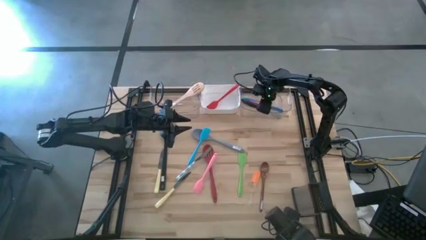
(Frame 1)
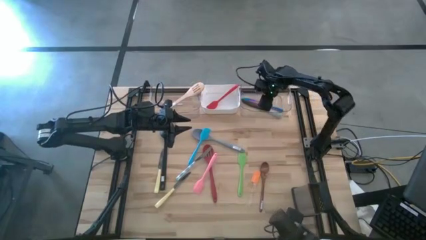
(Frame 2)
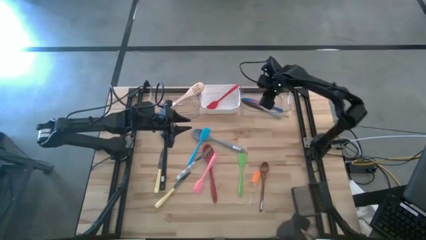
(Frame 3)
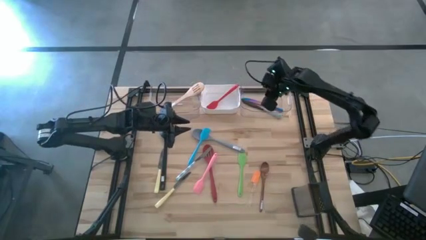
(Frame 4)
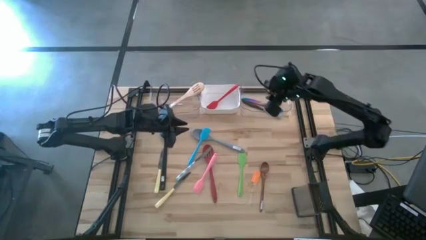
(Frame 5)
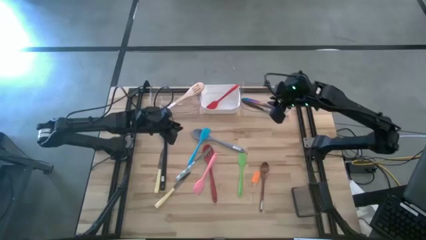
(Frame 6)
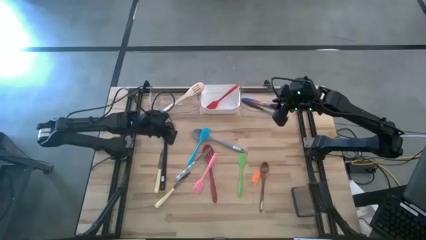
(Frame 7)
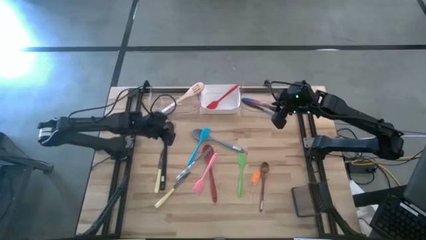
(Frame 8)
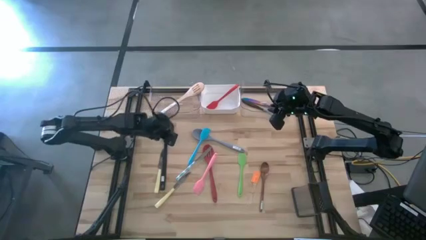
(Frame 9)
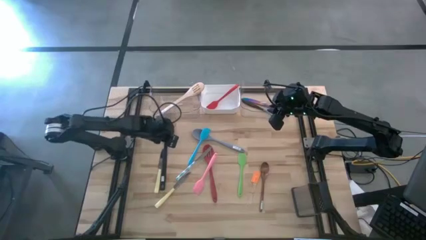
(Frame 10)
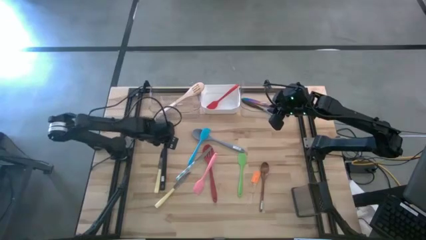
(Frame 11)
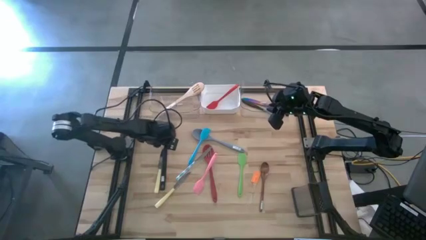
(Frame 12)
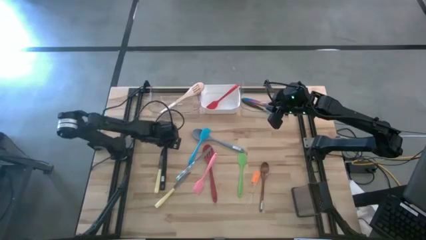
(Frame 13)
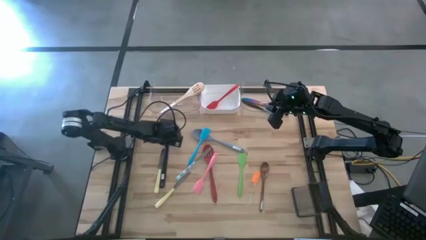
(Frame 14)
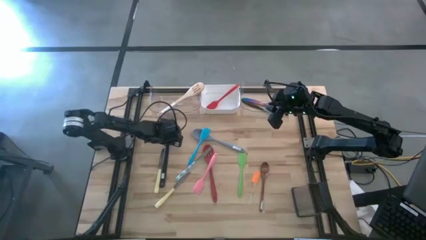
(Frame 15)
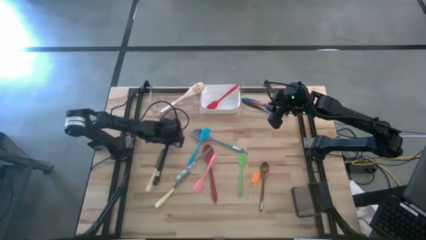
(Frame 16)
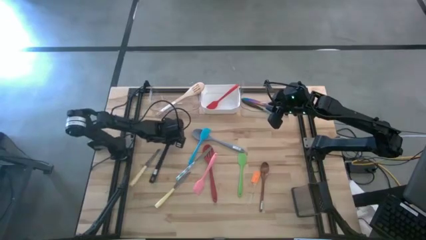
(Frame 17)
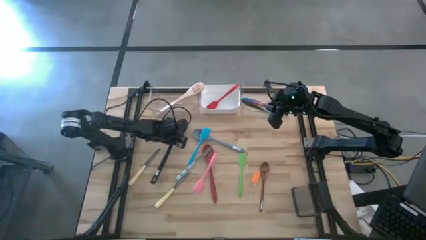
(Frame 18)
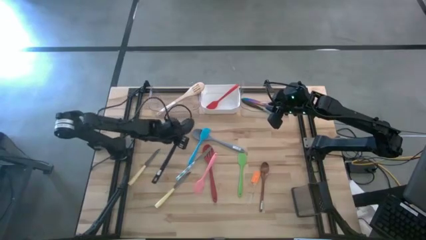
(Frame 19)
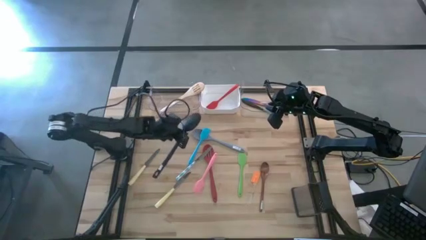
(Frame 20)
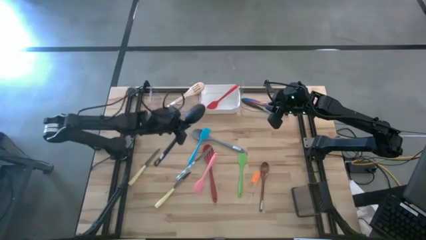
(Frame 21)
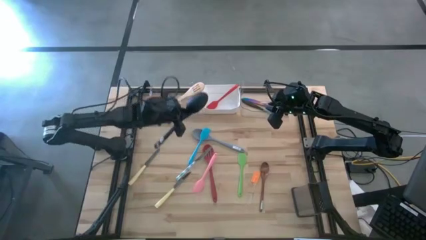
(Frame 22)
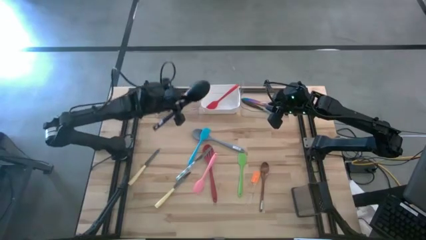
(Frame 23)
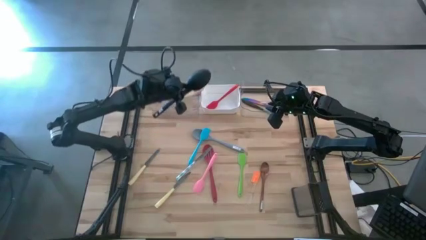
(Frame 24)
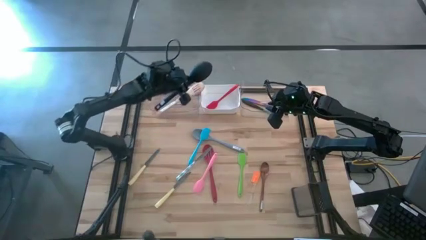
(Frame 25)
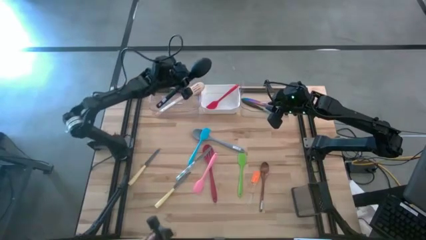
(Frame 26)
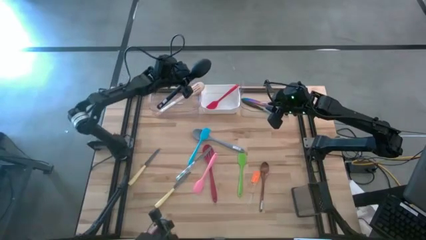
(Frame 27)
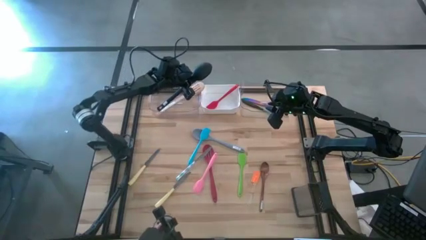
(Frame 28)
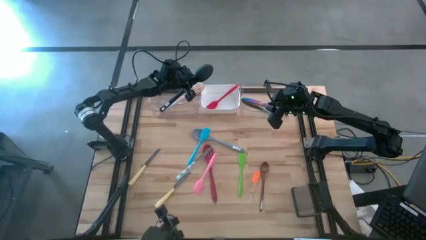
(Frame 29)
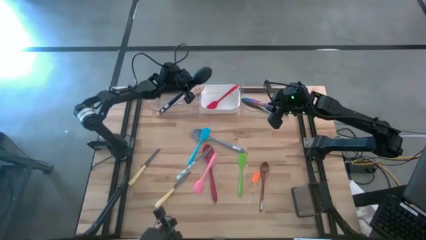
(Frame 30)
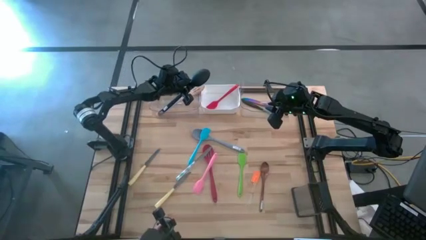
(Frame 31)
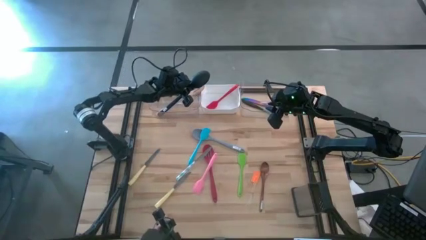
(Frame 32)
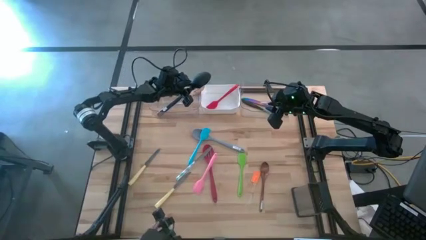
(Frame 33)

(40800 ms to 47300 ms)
Task: Pick & Place Kitchen Items
Put the black cooking spoon into the left transparent bin

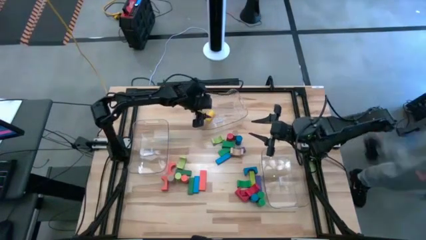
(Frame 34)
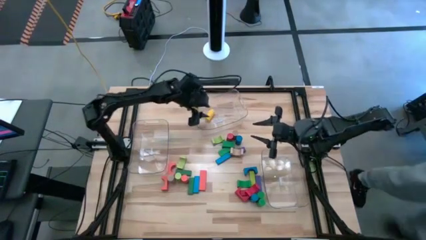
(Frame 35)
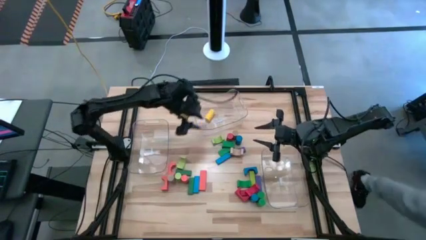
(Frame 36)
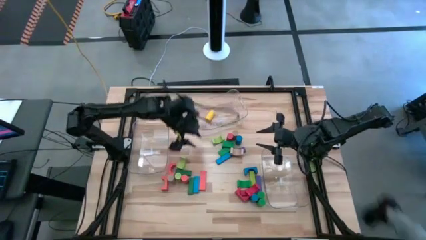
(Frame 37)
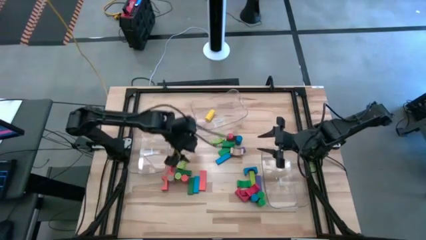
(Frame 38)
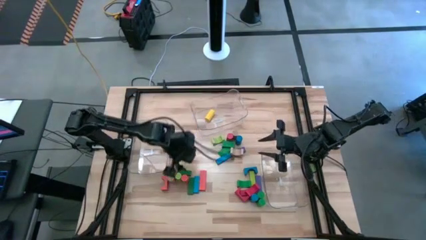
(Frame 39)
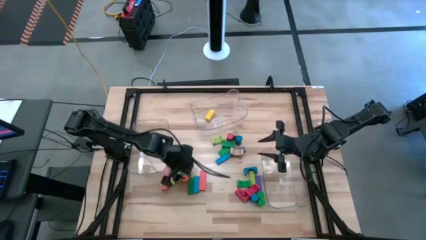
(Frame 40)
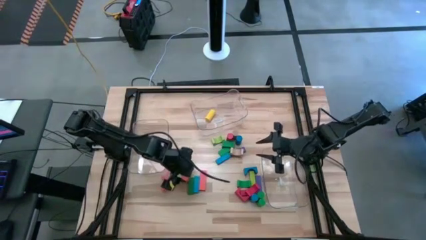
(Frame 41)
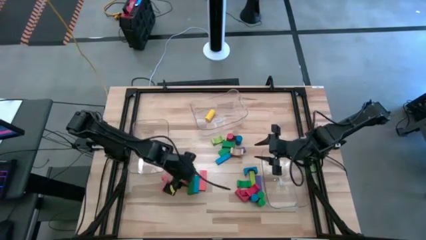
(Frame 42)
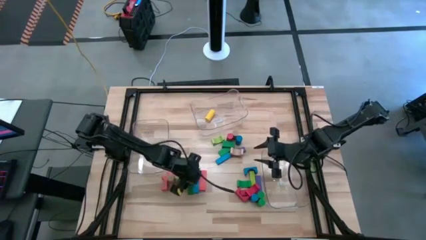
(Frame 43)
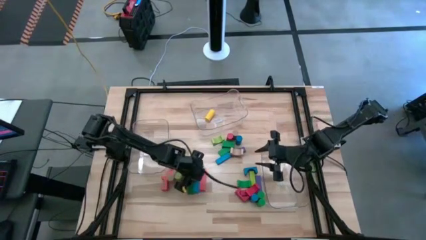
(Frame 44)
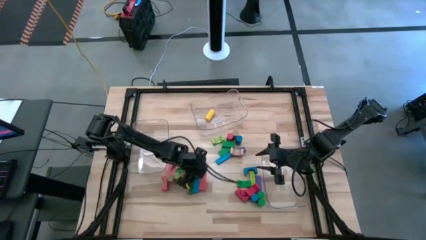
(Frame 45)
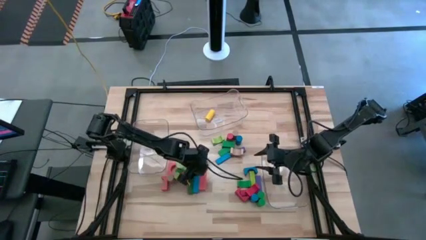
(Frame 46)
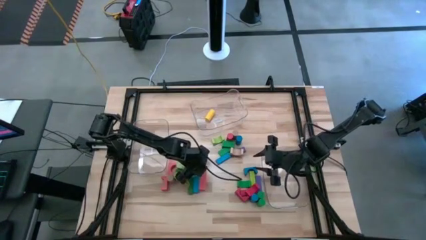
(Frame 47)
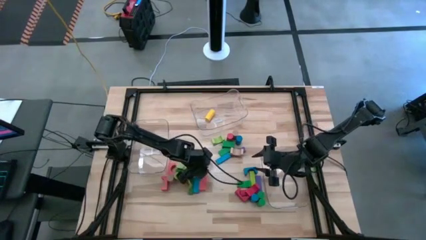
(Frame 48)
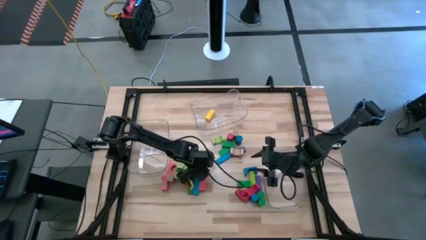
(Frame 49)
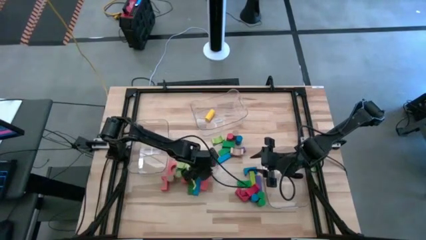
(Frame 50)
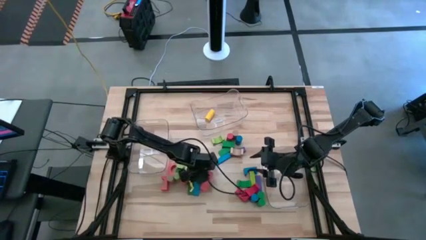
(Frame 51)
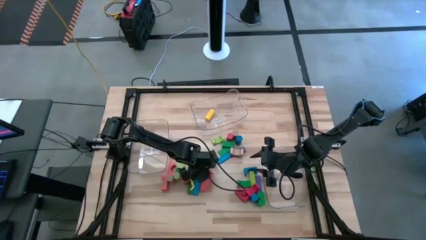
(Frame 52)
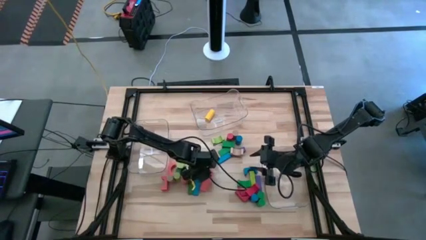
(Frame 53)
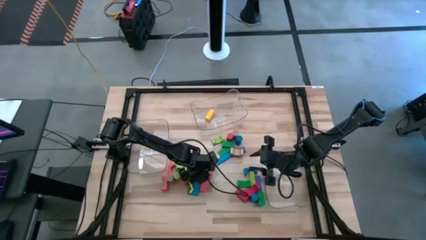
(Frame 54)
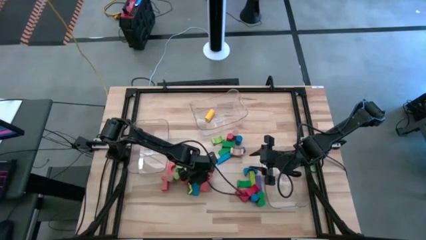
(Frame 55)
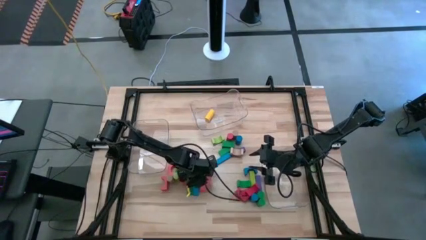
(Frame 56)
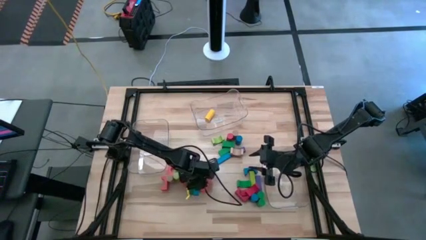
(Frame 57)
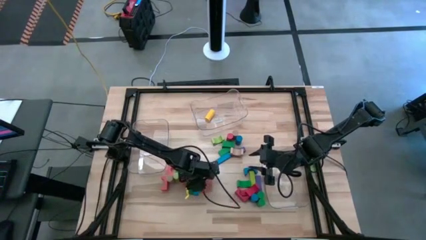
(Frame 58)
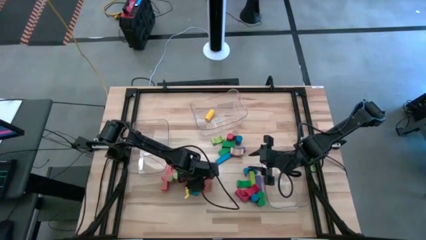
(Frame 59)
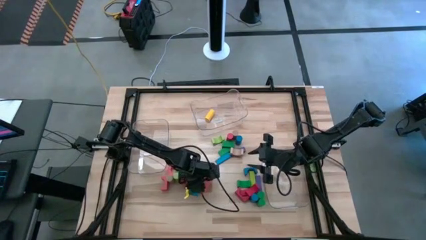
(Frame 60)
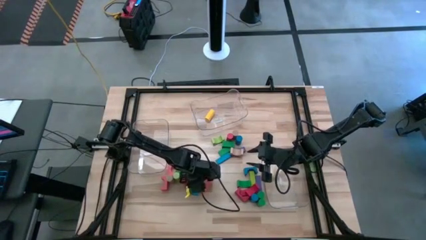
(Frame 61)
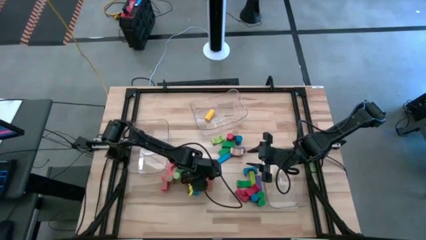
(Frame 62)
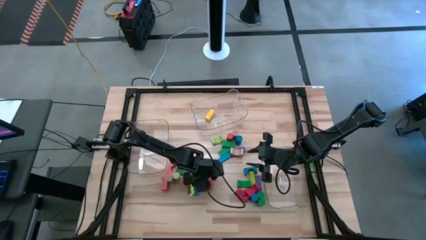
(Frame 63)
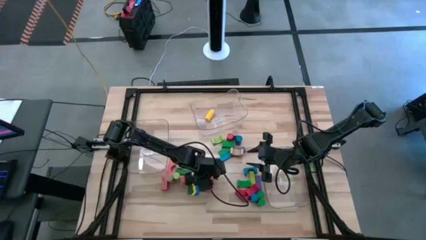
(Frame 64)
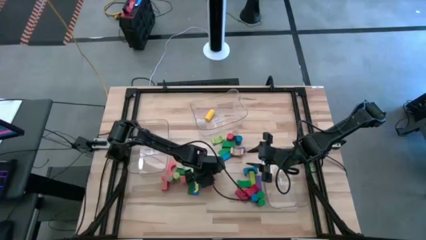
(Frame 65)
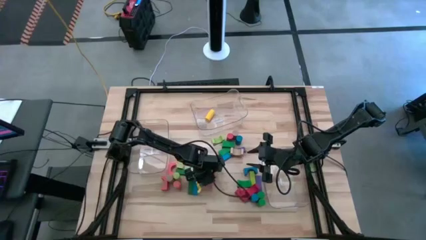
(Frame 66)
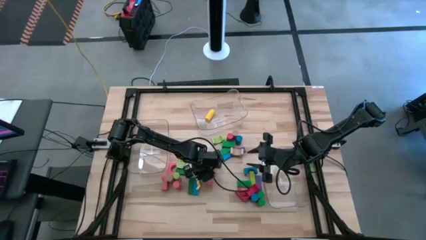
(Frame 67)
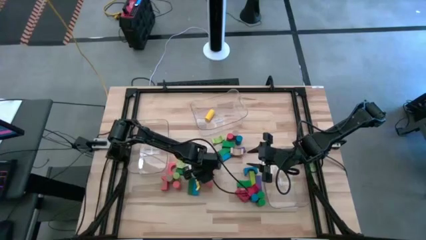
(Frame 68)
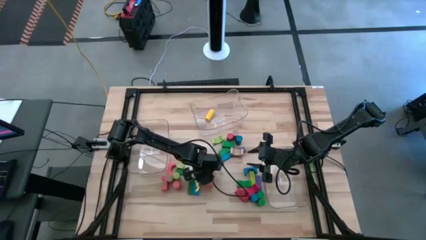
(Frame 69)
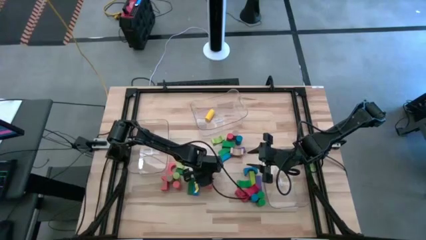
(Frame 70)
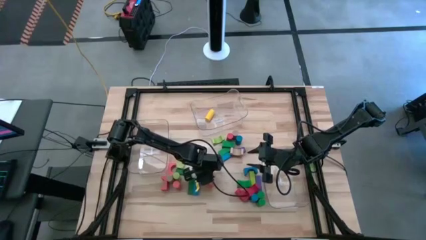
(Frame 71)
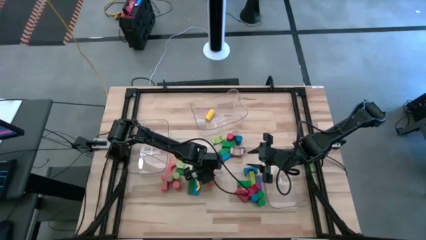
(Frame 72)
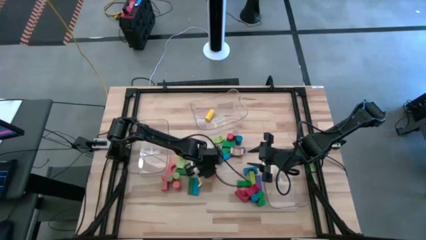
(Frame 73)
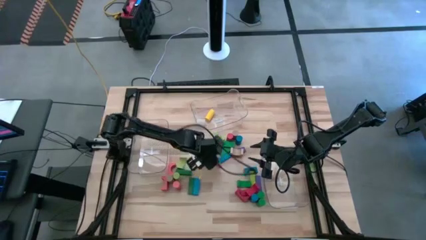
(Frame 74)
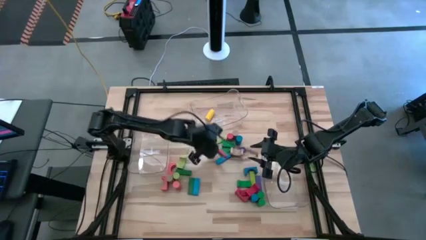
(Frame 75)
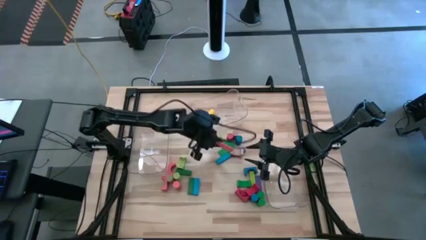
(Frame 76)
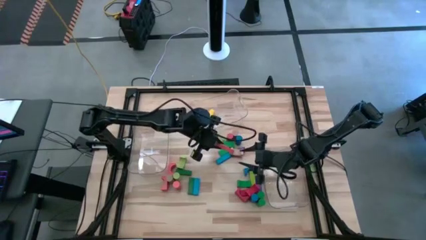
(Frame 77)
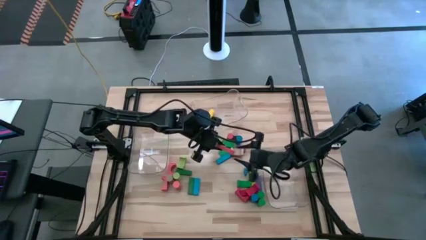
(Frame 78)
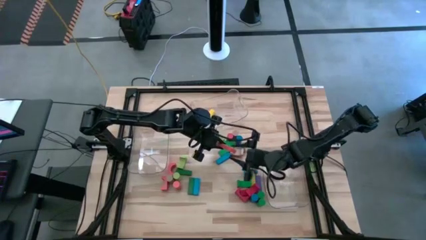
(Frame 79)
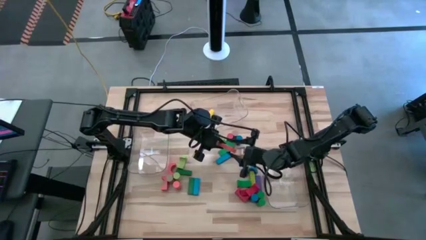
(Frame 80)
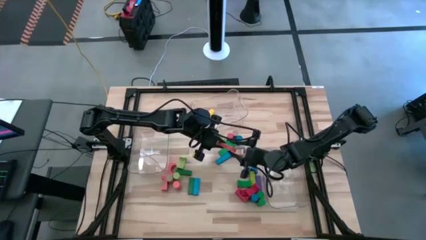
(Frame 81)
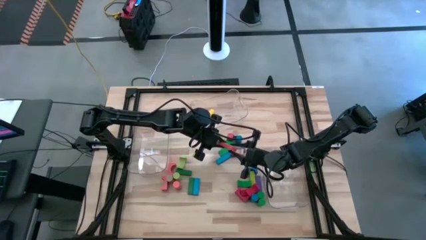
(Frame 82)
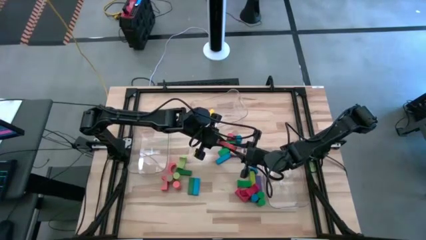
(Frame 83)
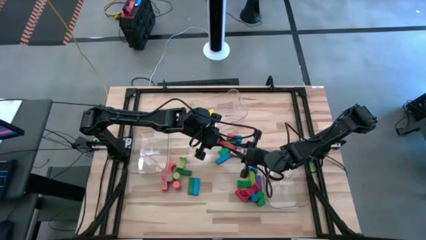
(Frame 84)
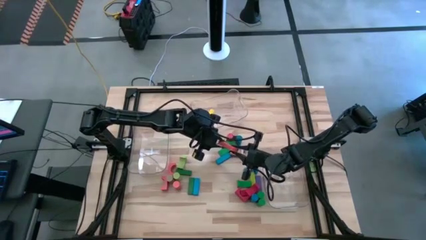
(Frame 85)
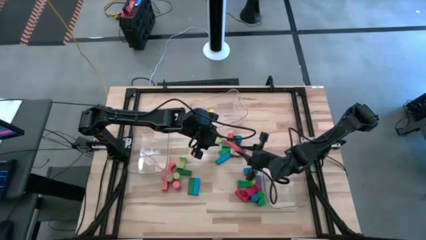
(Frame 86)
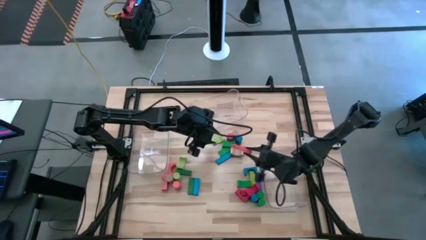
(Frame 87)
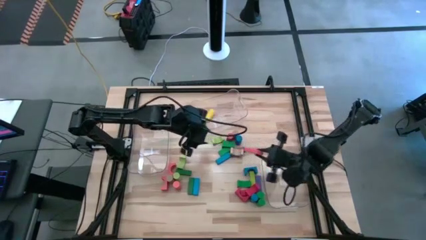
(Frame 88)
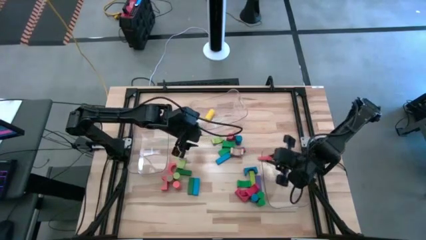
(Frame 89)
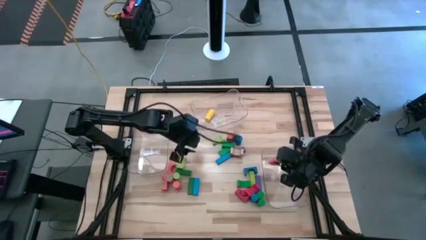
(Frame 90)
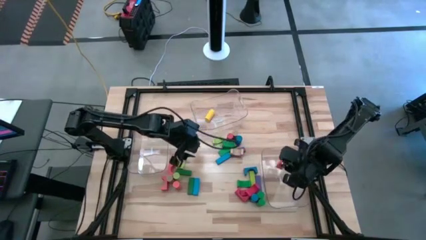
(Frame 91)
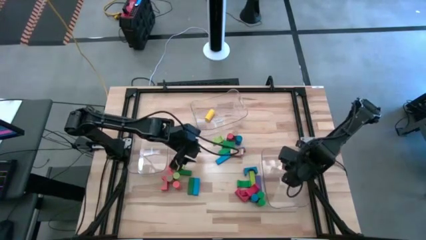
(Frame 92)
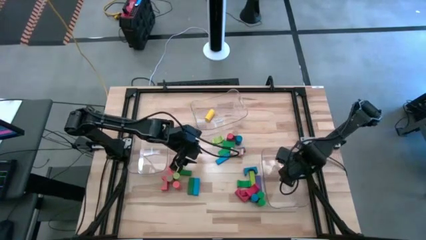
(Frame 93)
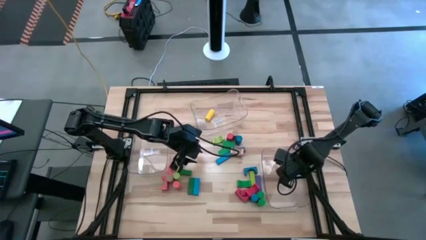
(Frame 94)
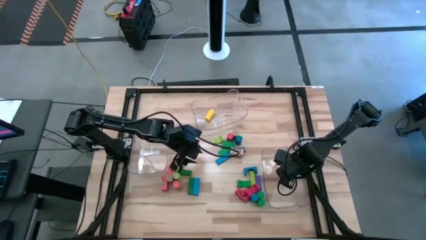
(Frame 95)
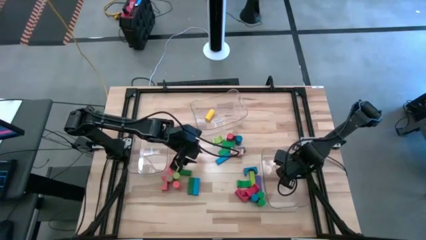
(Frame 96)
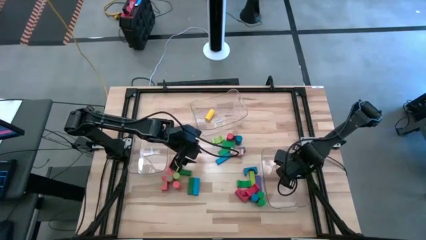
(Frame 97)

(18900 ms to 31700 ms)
Task: Sort blocks by size
Put the orange rectangular block into the right transparent bin
